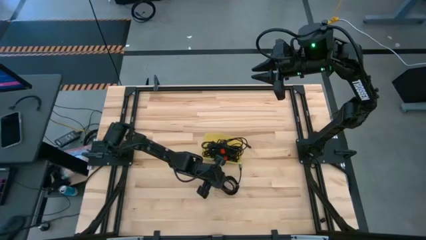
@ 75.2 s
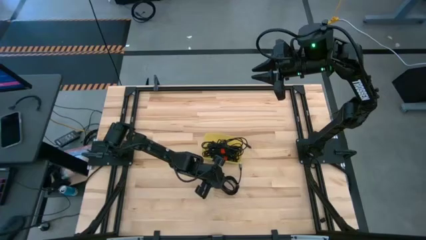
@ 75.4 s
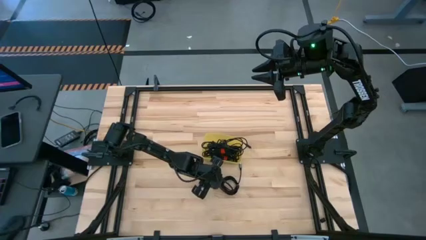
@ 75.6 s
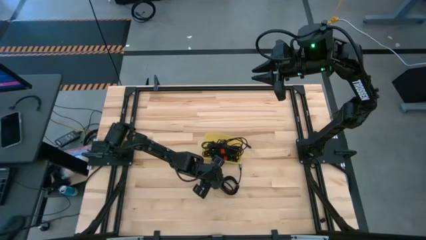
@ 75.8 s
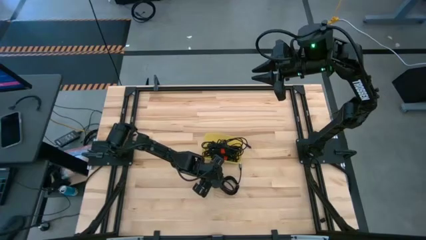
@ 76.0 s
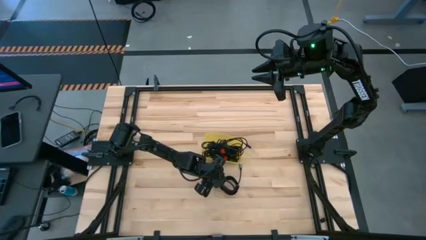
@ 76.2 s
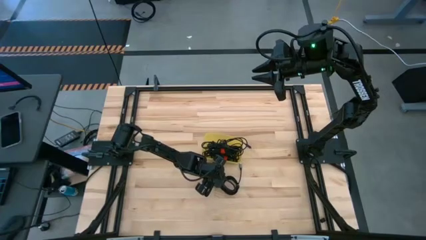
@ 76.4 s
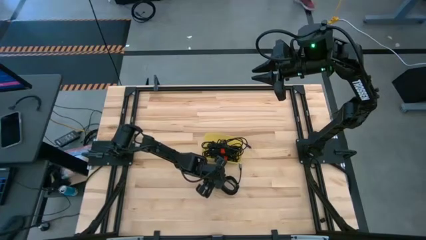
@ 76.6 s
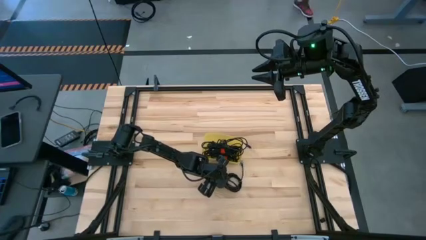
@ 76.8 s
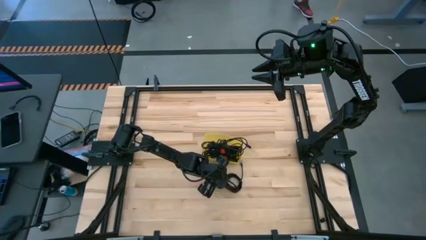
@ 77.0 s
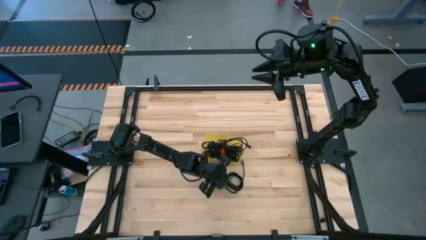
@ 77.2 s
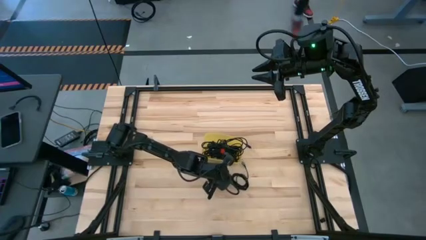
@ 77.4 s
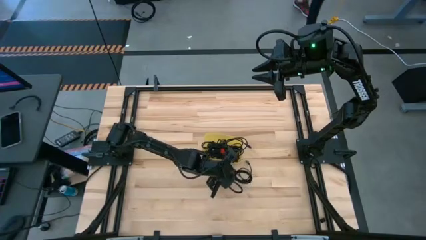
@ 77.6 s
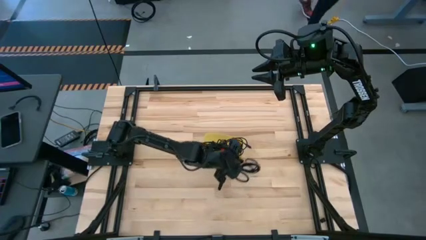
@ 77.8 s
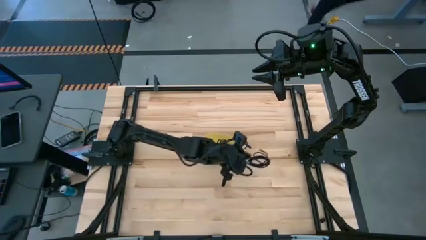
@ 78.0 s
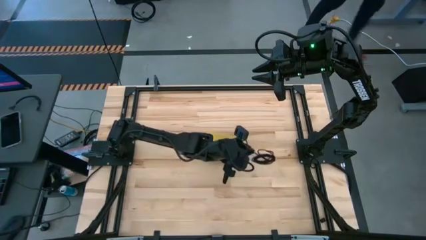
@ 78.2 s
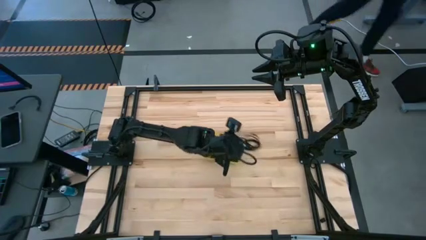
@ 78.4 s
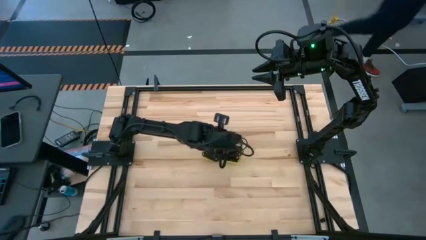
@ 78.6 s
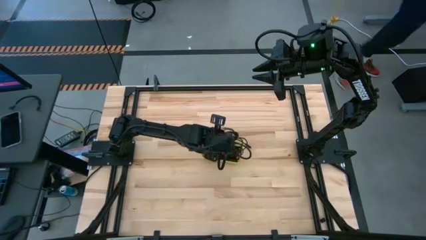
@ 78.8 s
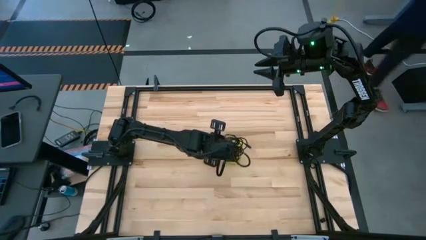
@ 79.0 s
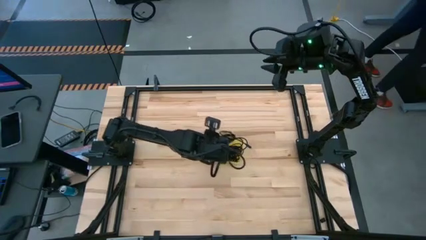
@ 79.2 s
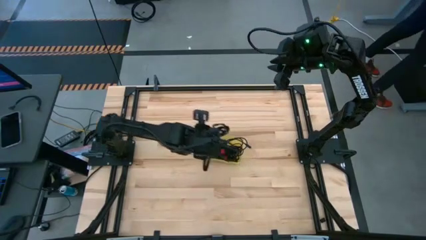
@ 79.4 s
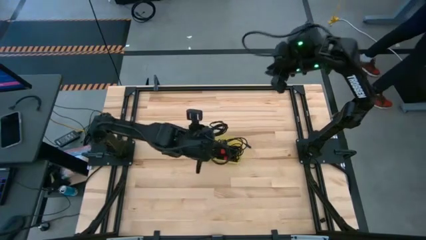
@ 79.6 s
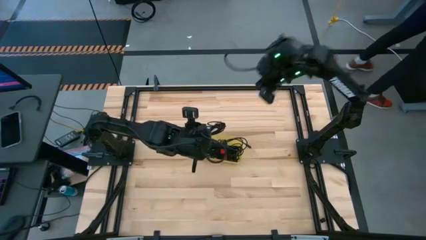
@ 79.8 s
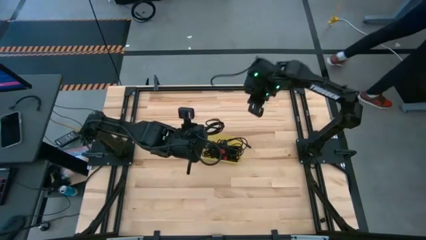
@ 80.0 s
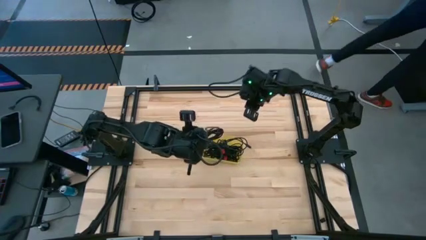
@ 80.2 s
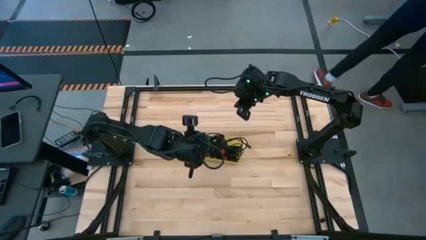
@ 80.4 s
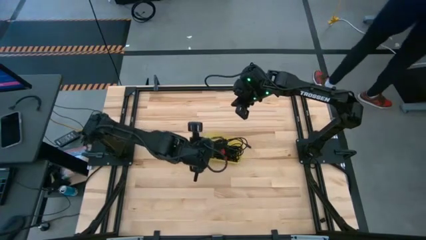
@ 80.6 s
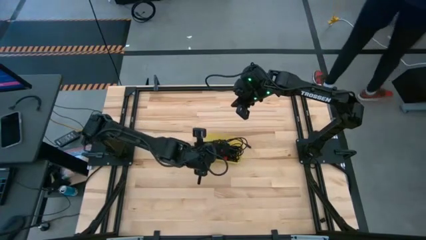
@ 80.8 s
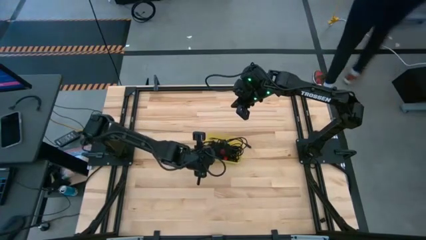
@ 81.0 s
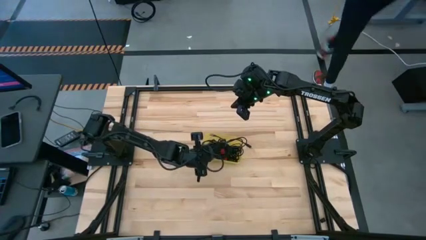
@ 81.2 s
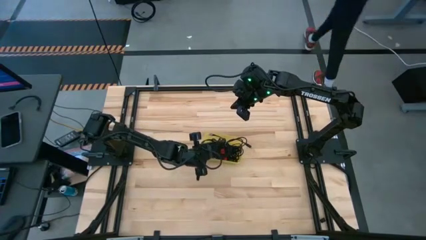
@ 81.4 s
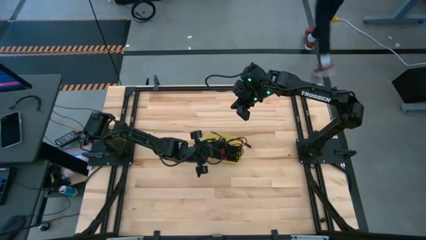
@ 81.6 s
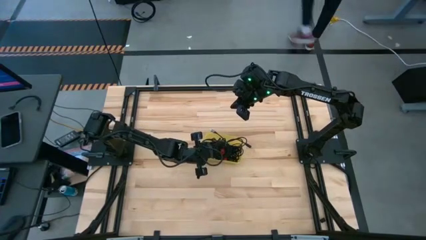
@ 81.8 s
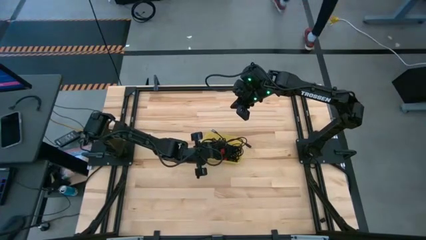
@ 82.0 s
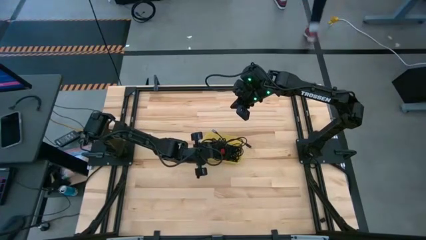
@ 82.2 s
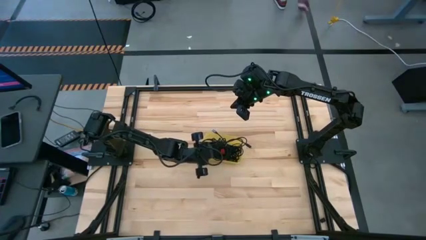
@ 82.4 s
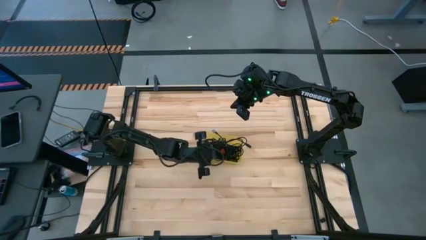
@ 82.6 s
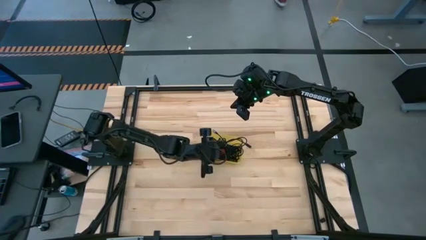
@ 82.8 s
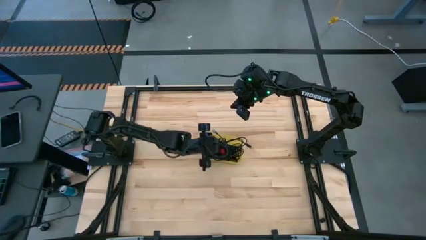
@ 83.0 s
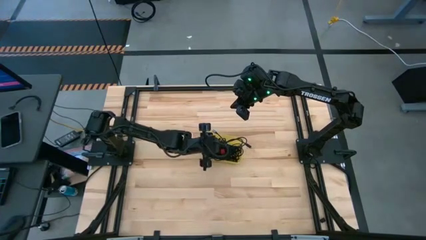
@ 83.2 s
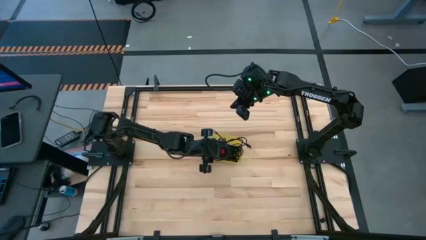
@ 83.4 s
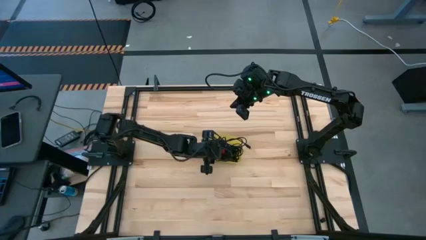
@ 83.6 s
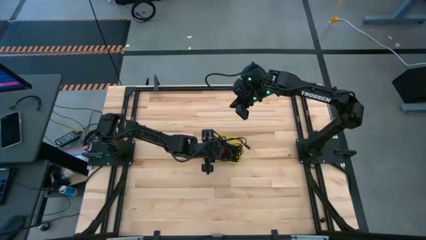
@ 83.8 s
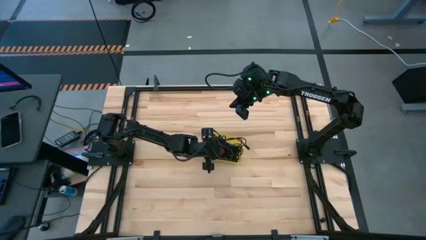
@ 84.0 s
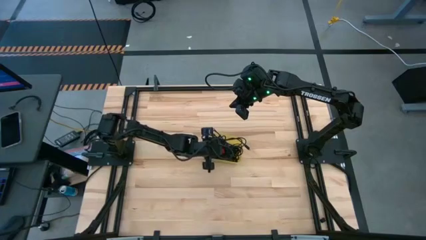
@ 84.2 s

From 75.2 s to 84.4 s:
Task: Pick and place USB-C Cables
Put the black charger cable into the yellow bin

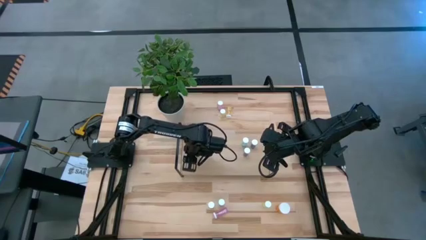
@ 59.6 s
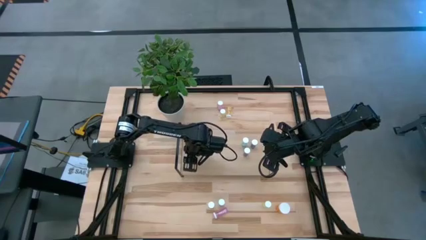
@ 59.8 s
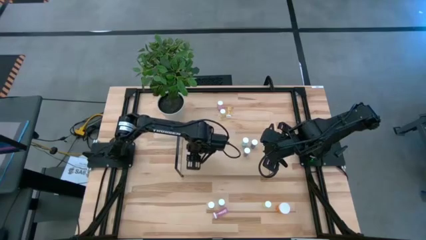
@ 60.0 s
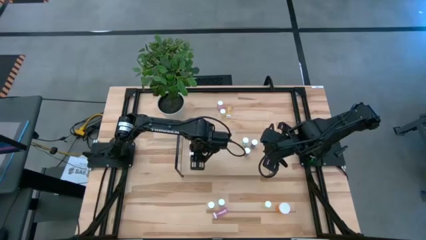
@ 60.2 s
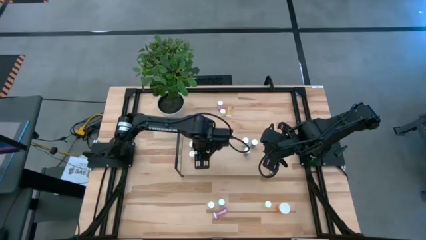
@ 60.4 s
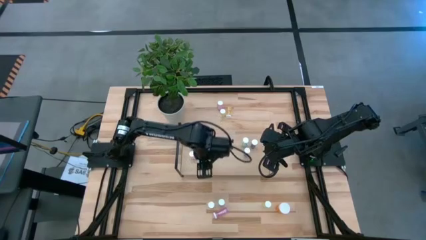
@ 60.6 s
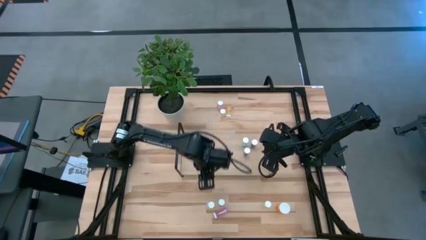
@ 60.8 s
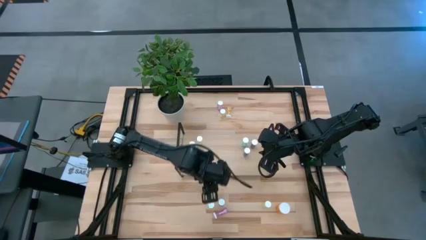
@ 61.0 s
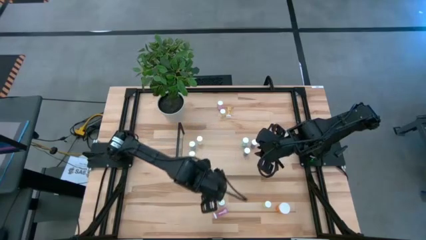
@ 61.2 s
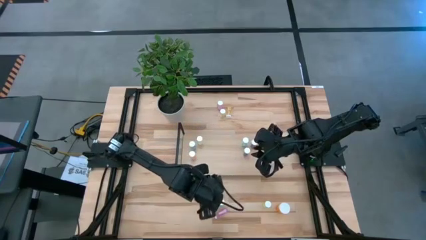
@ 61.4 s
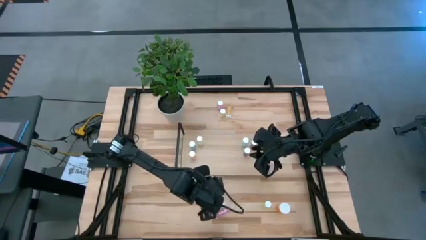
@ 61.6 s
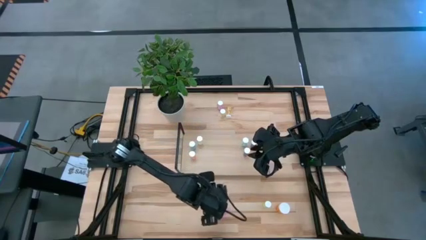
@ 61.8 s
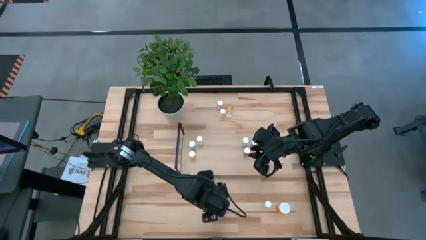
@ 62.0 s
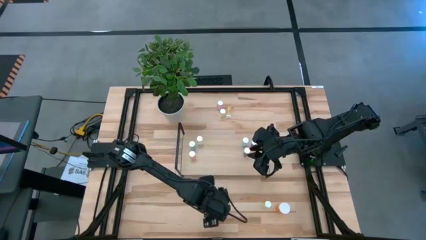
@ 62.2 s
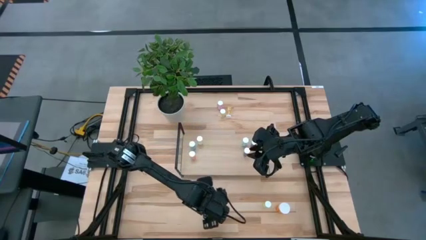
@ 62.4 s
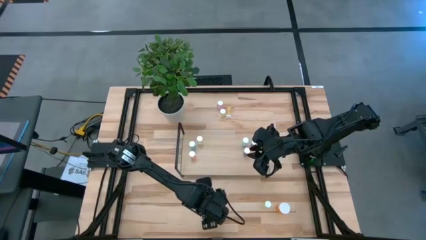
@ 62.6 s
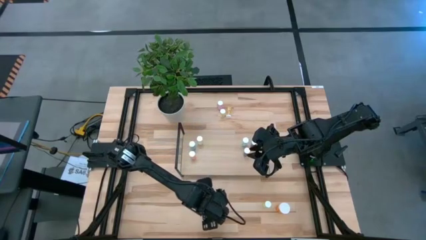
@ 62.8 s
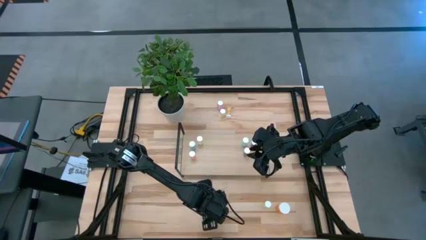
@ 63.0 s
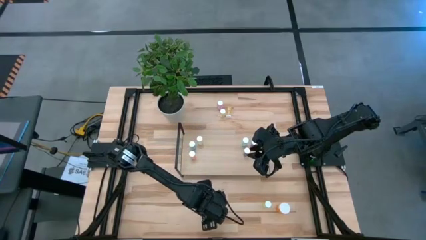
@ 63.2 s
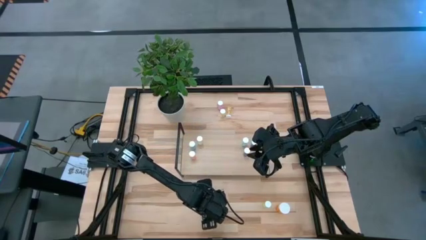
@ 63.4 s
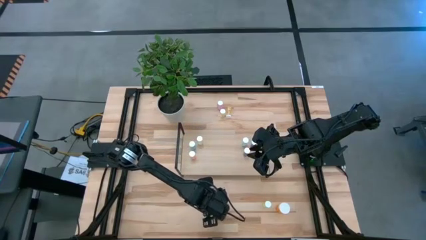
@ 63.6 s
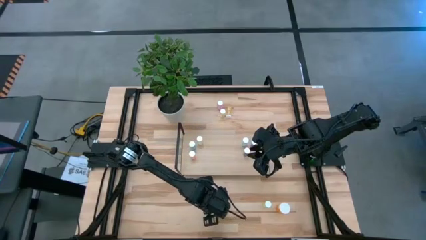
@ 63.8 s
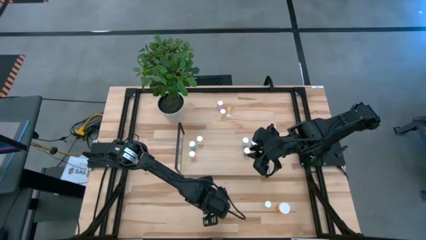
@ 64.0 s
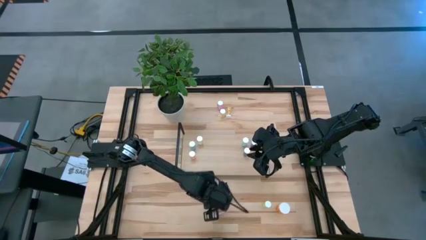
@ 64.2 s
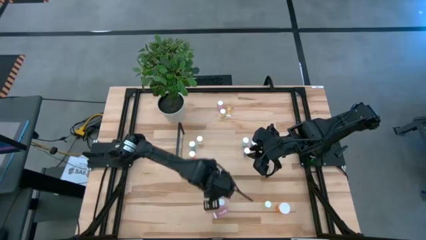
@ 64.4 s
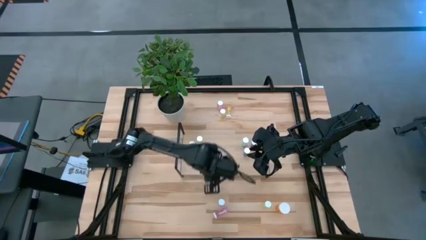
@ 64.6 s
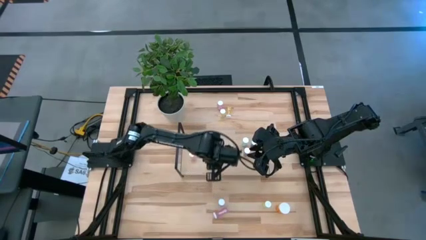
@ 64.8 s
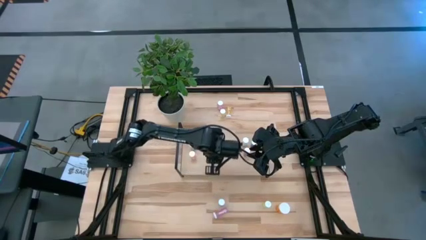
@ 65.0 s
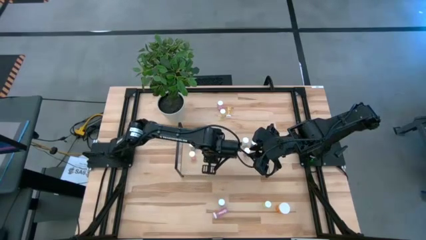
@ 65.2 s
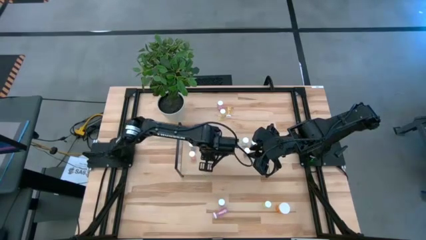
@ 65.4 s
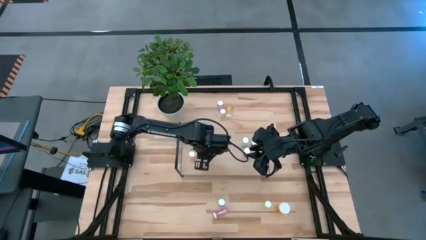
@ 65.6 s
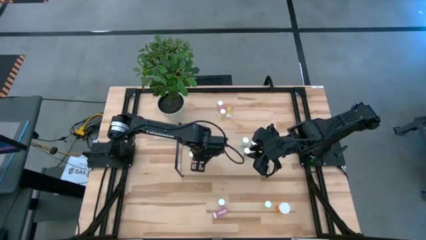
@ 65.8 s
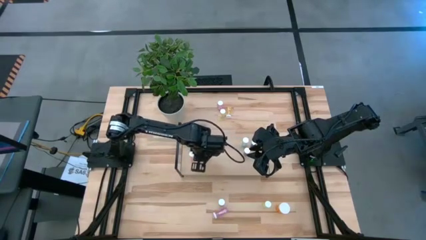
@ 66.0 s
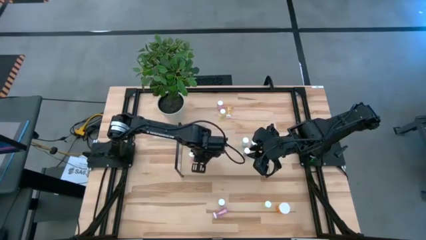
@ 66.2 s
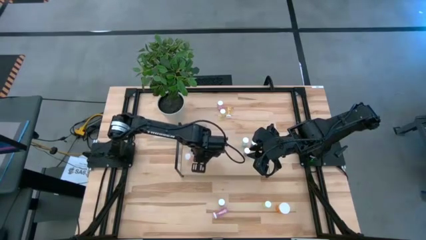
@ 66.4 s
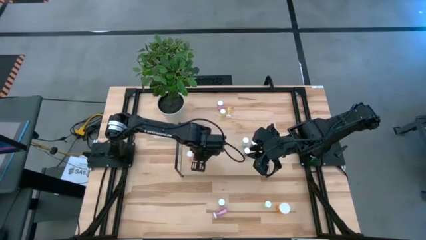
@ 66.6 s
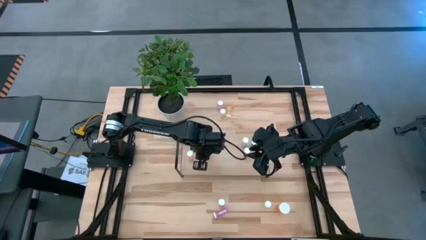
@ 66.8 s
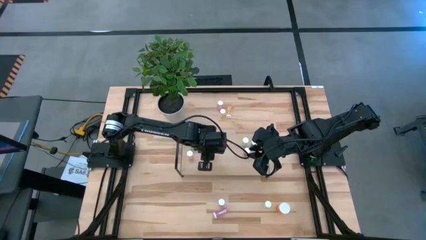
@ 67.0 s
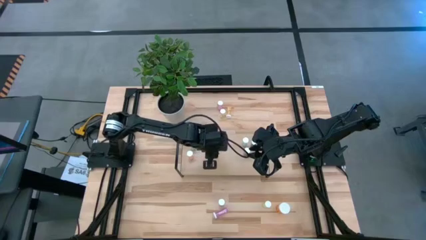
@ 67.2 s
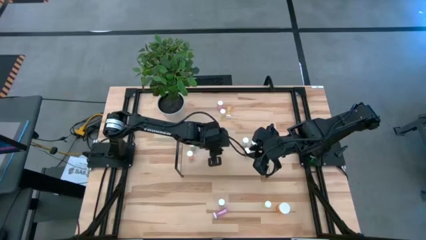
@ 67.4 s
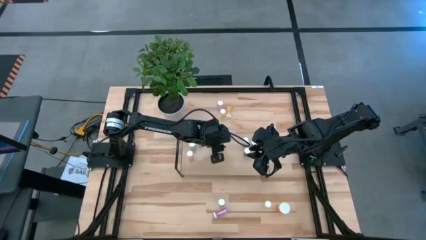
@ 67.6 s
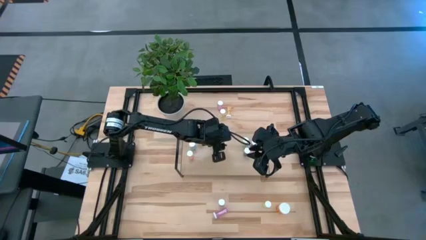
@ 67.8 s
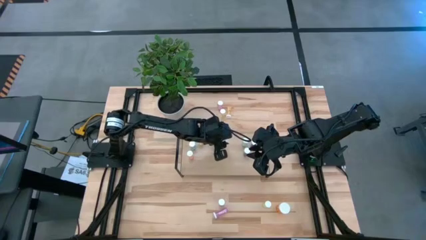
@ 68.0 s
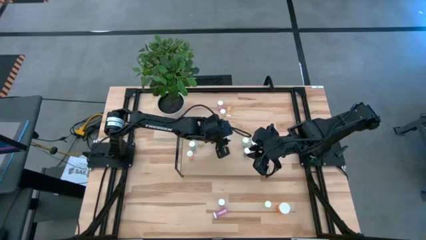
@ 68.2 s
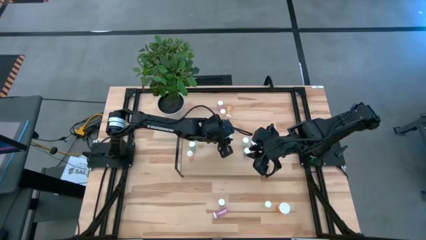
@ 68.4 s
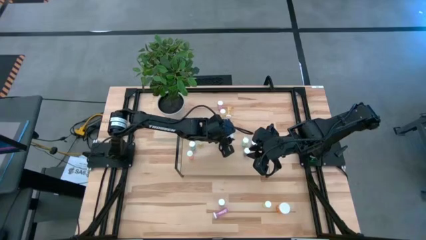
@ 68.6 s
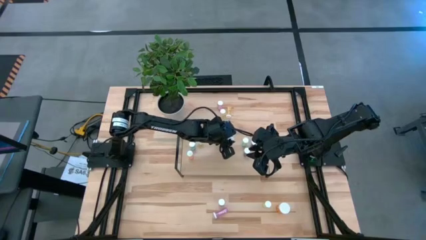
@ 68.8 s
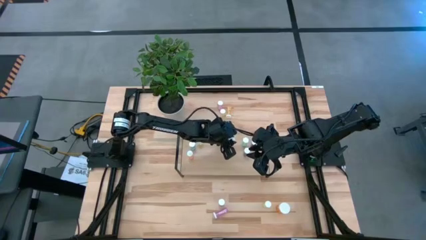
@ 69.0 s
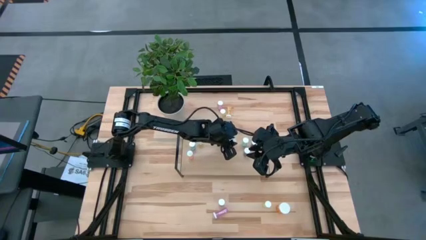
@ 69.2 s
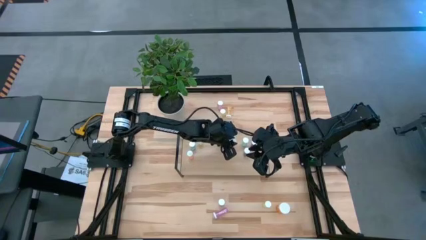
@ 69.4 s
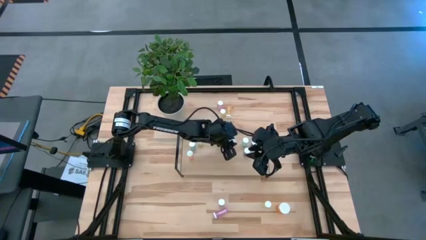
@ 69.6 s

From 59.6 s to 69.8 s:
Task: Pick and place medicine bottles onto shelf by color
Put the yellow pill bottle on the shelf
